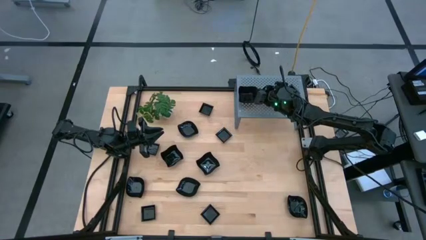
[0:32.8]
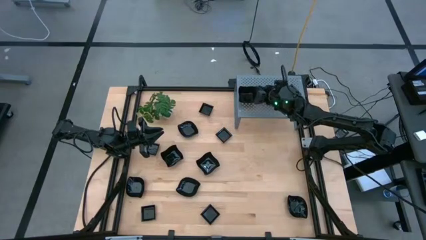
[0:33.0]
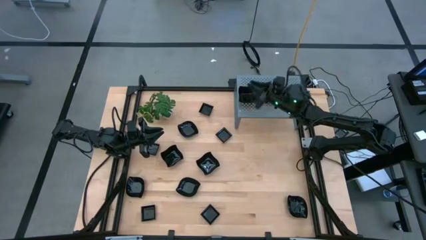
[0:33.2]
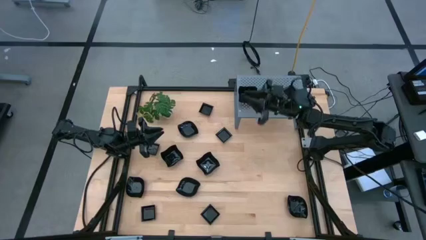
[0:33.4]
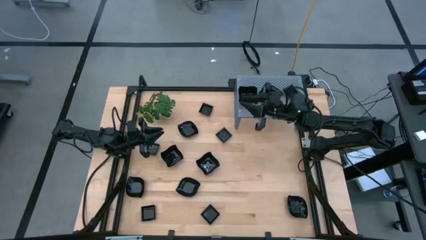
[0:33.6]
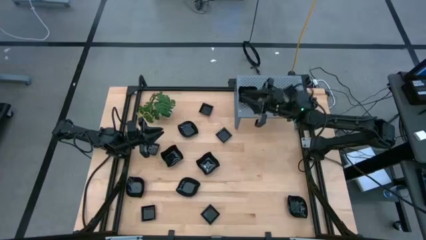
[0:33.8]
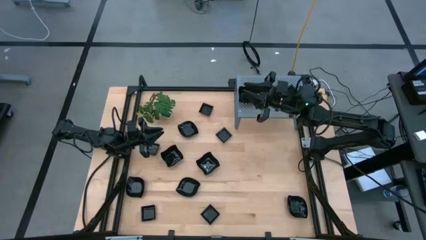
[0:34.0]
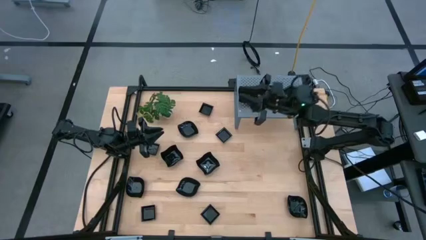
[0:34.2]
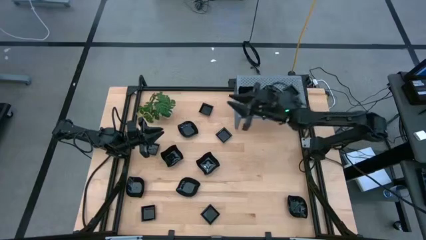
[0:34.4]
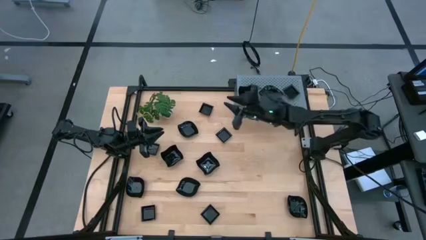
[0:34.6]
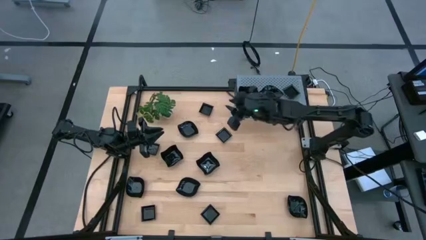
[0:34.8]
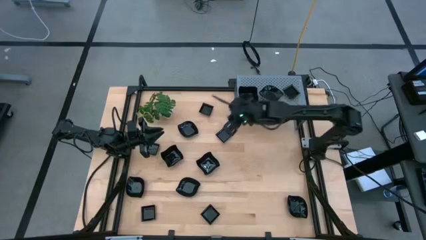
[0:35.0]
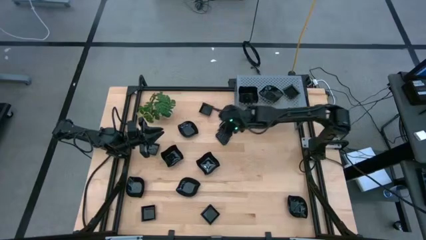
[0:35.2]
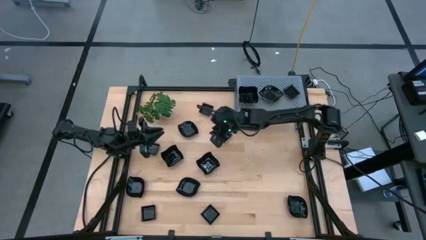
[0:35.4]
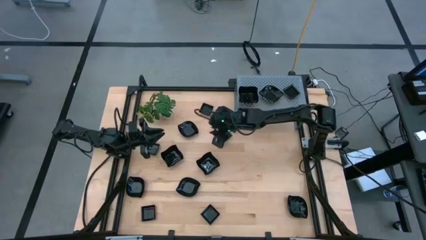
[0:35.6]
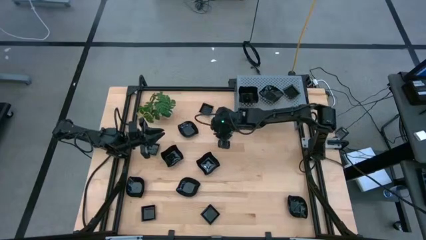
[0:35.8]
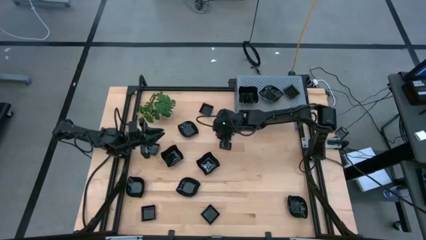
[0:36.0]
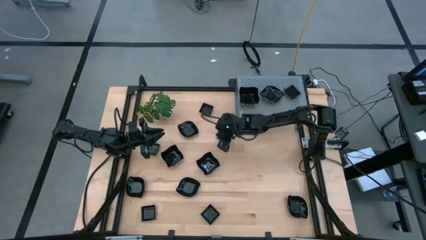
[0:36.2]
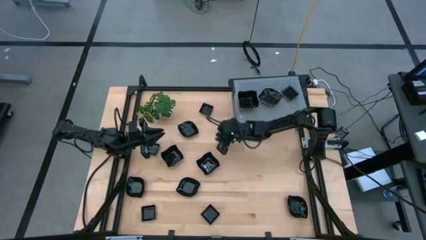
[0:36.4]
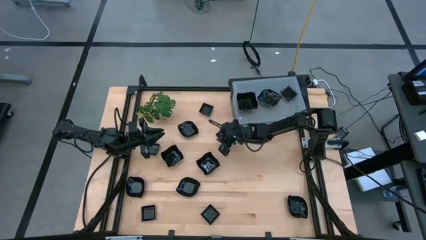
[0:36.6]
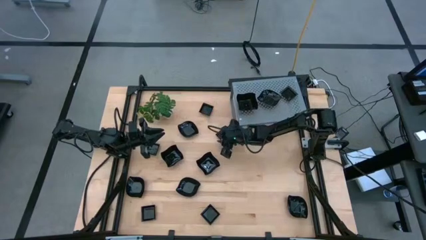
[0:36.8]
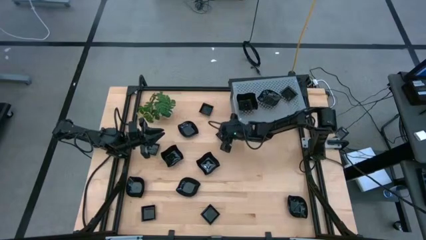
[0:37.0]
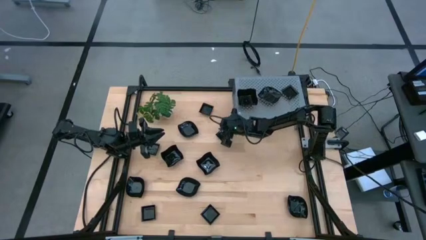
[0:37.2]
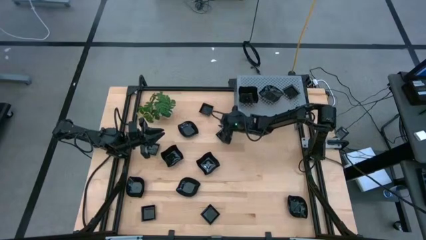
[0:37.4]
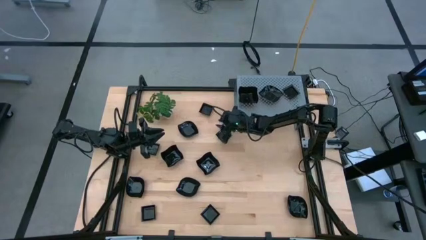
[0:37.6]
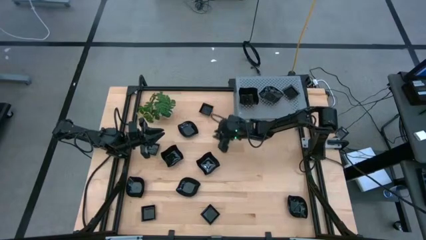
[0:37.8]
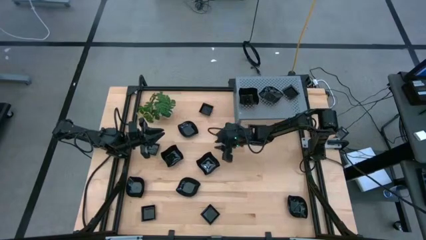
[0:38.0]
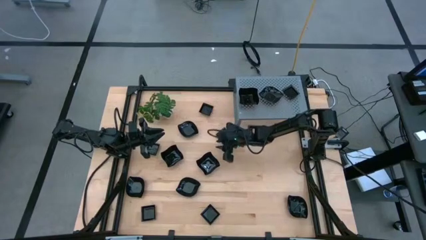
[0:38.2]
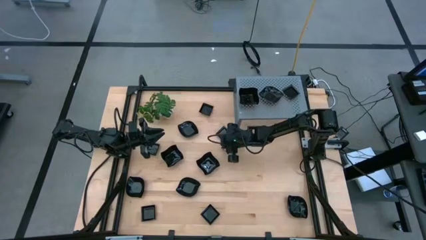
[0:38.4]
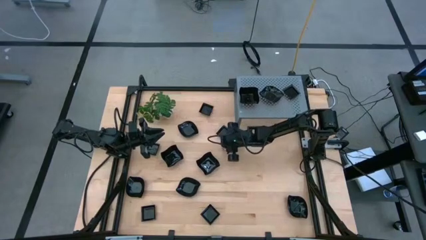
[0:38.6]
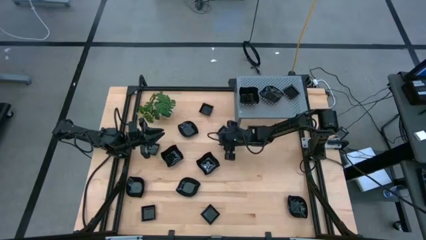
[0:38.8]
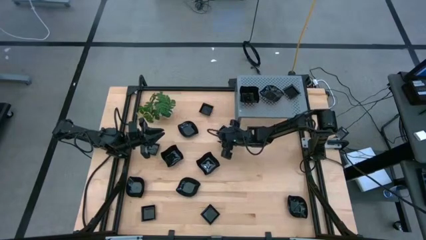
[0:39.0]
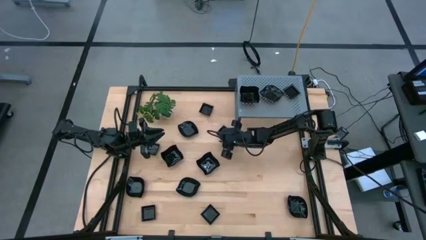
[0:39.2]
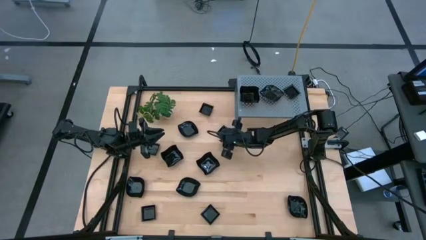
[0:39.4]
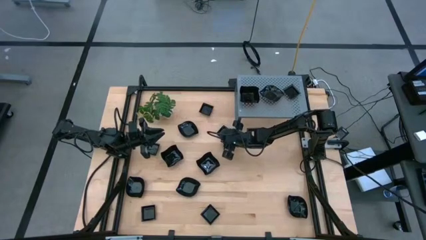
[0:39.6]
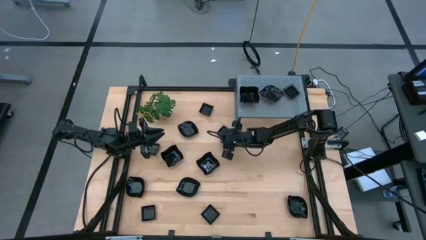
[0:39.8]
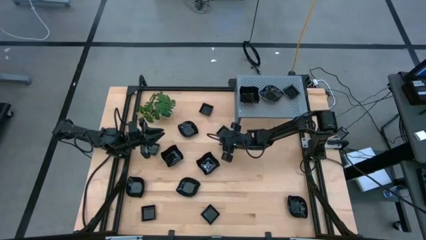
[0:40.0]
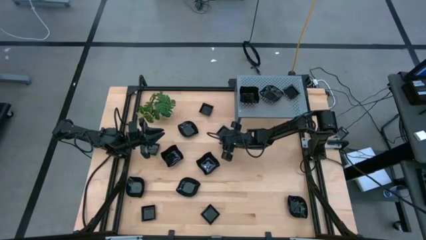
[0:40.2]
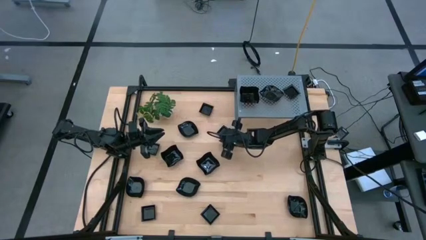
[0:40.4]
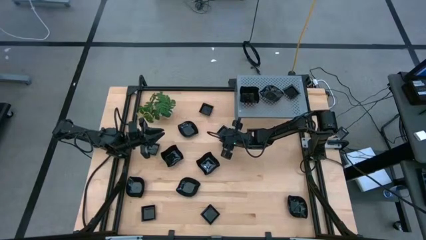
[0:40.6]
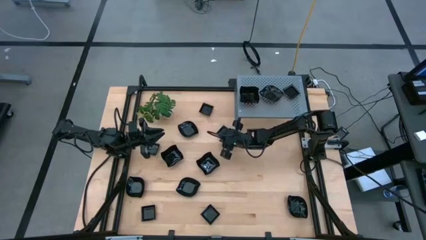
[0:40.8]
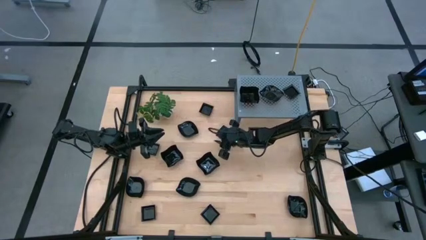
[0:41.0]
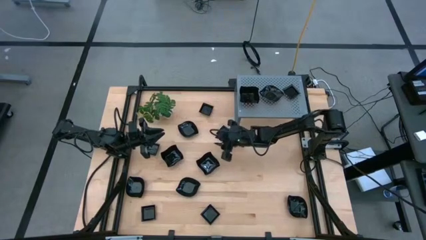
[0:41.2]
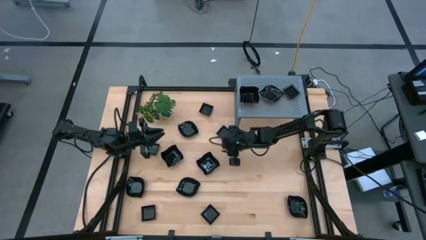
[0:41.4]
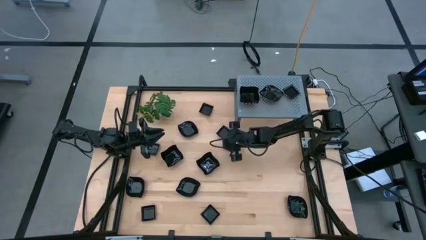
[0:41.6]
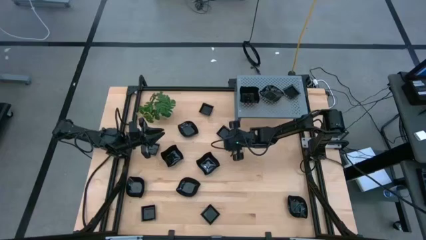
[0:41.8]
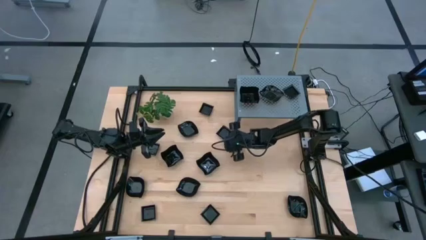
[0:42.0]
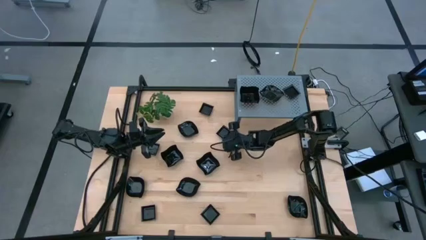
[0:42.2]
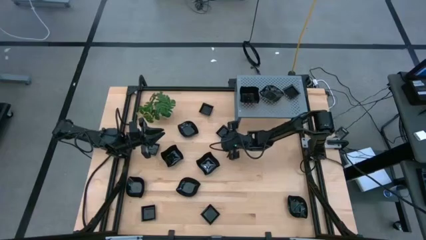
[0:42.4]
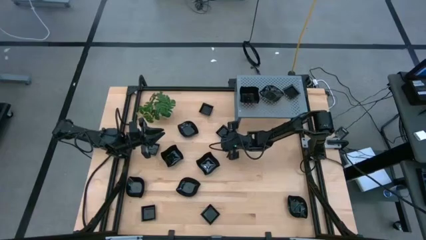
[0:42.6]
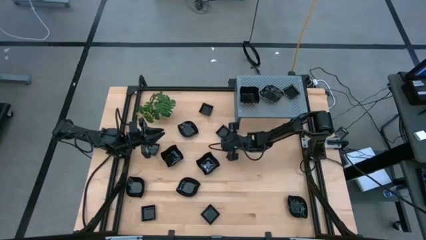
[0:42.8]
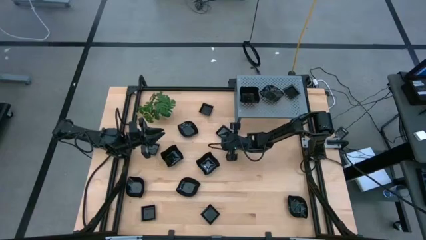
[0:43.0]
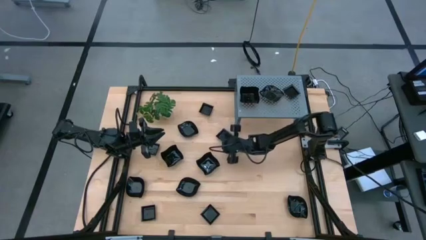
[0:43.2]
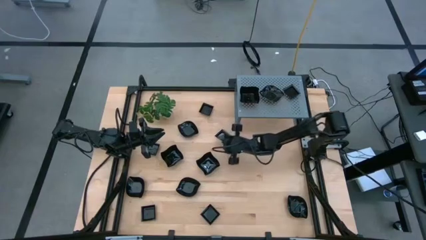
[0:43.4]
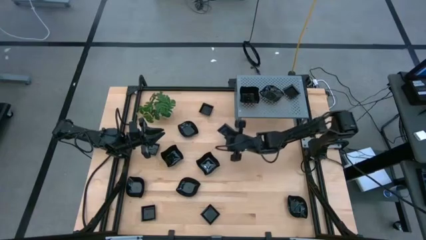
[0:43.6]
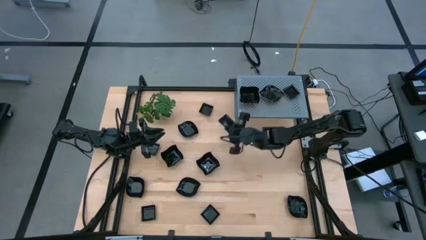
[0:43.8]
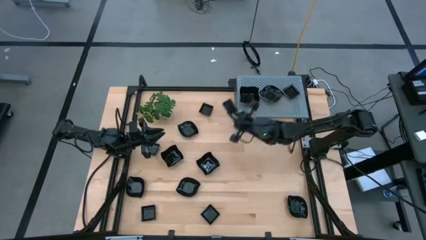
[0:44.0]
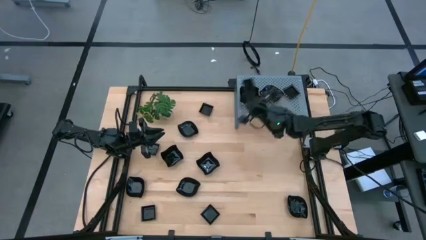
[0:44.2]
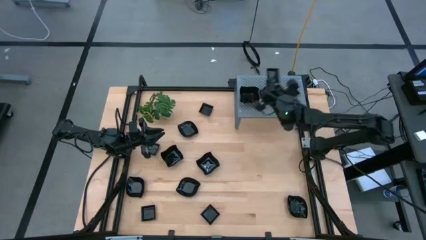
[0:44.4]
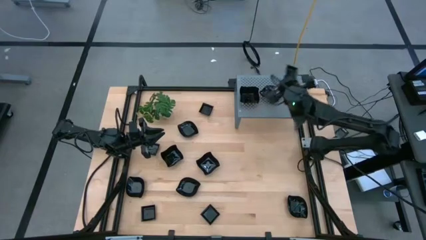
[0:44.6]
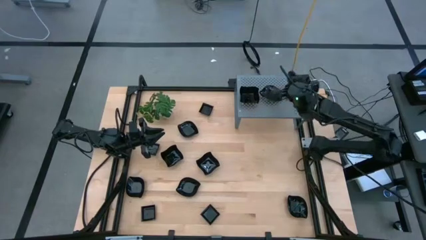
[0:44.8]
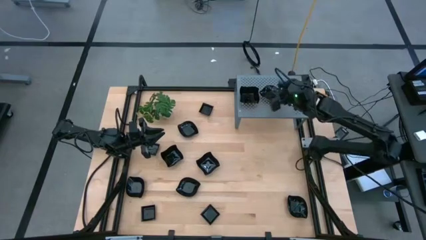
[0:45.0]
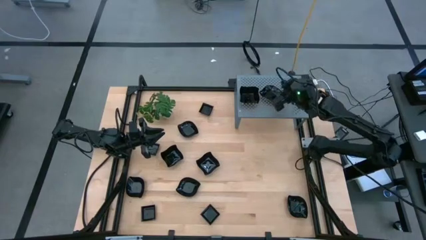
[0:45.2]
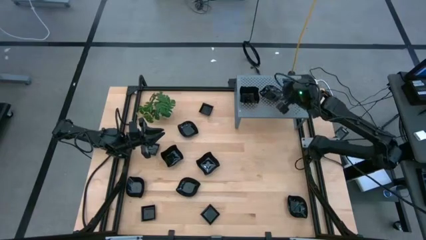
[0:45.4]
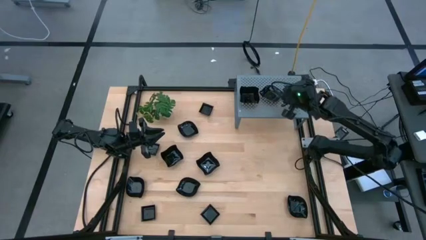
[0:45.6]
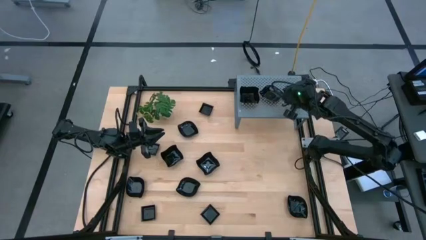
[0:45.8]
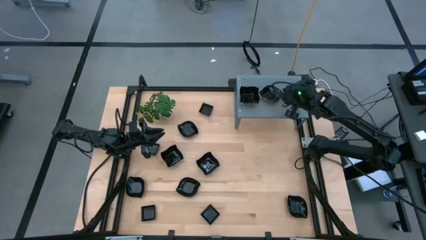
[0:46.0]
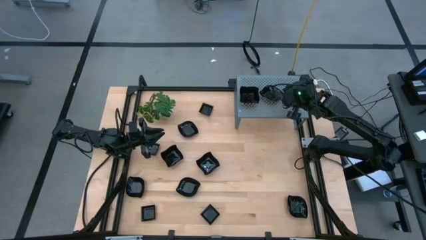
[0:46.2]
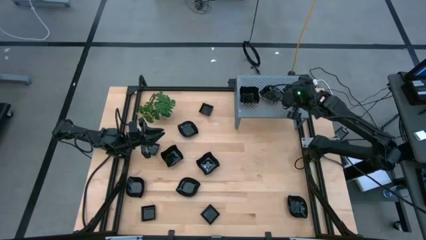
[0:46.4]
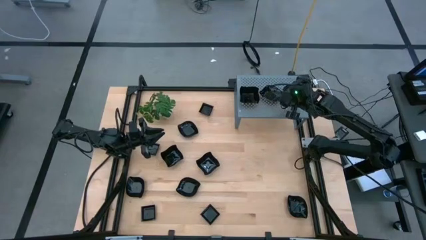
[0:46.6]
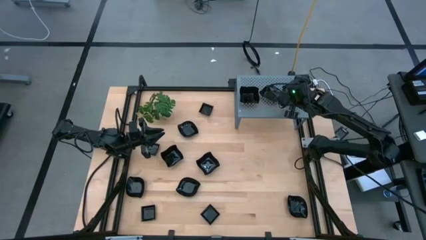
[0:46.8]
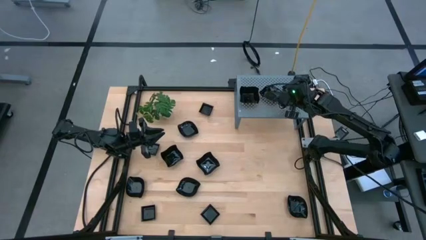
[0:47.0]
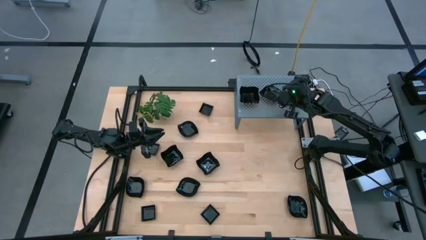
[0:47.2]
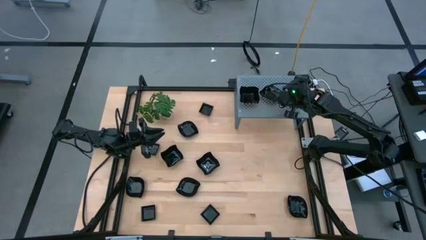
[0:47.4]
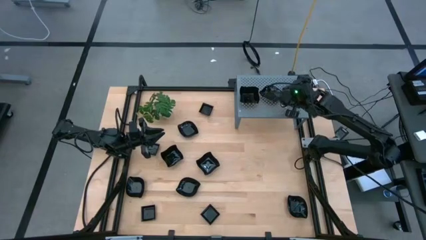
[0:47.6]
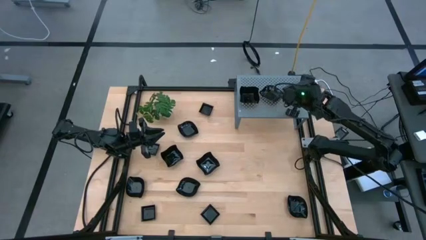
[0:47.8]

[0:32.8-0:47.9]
Task: Pick & Place Mini shaped plates
Stack the square plate on top of the square plate on the shelf
